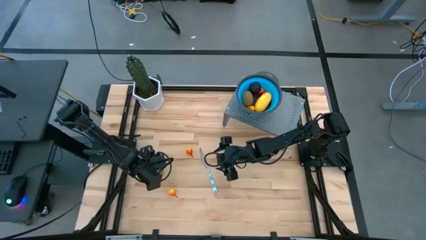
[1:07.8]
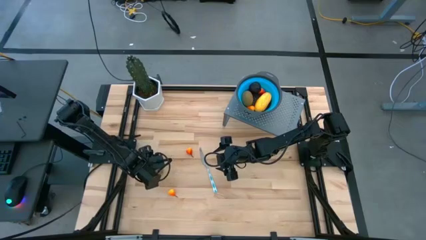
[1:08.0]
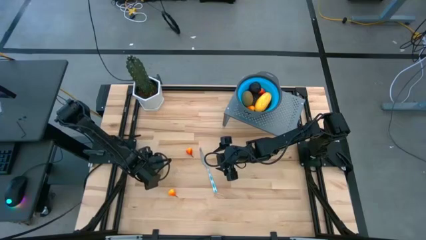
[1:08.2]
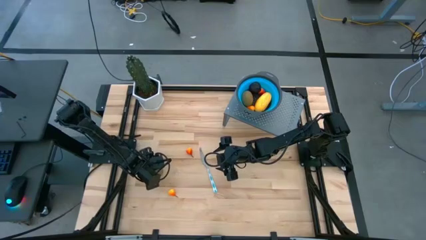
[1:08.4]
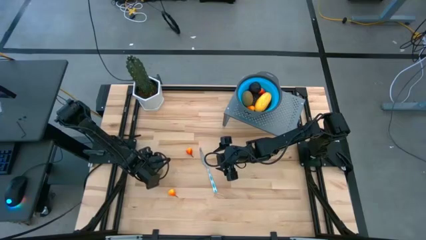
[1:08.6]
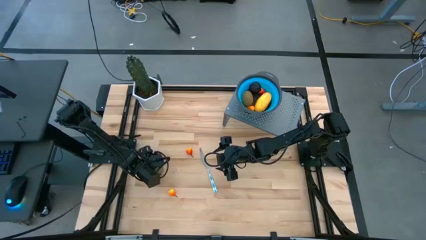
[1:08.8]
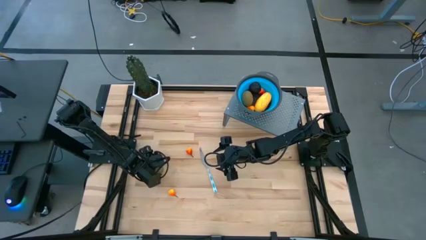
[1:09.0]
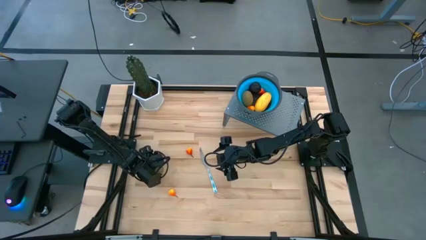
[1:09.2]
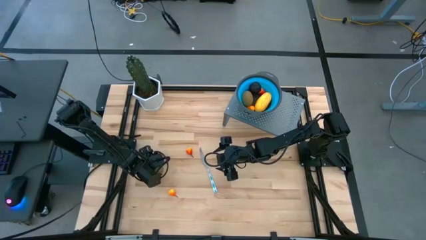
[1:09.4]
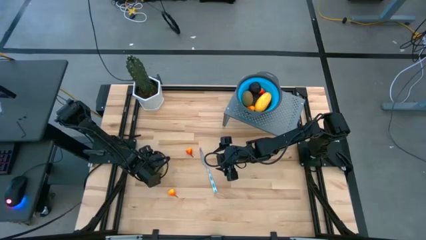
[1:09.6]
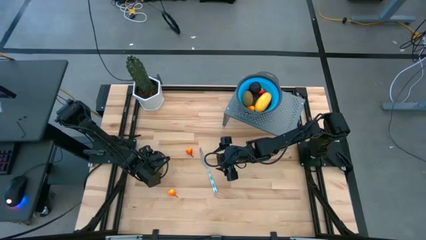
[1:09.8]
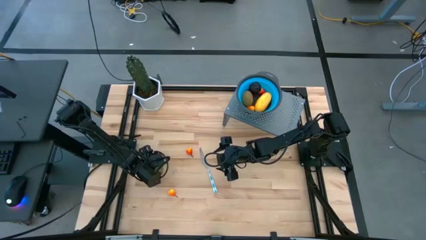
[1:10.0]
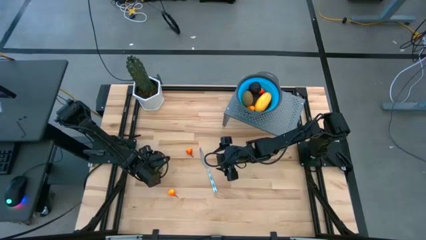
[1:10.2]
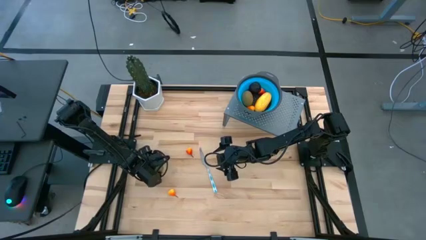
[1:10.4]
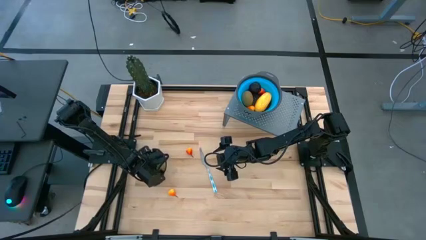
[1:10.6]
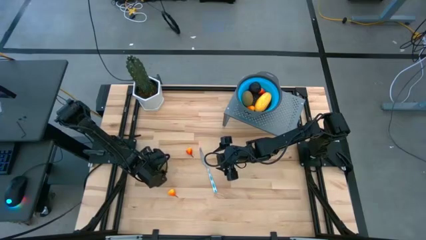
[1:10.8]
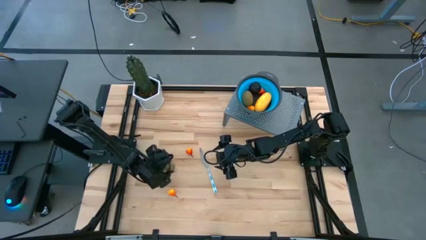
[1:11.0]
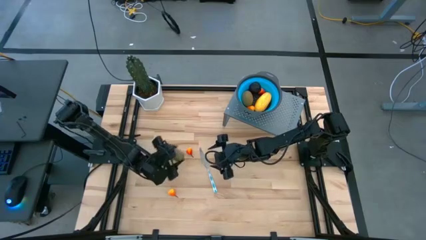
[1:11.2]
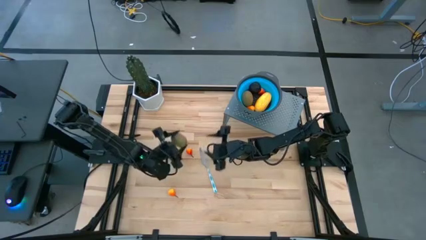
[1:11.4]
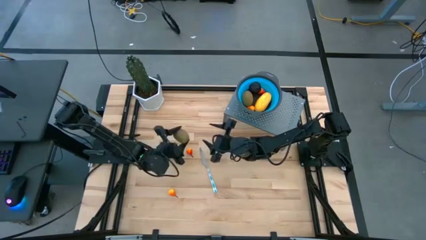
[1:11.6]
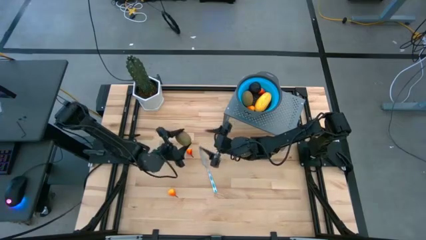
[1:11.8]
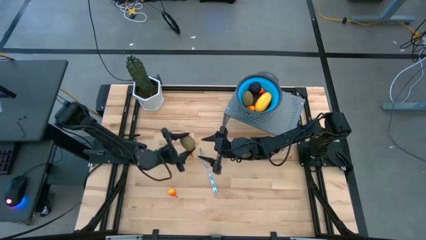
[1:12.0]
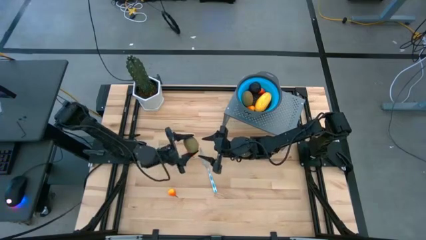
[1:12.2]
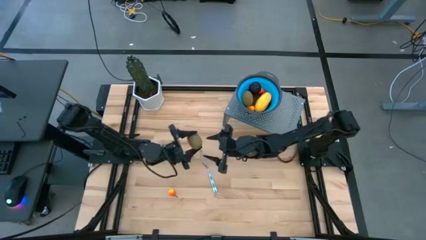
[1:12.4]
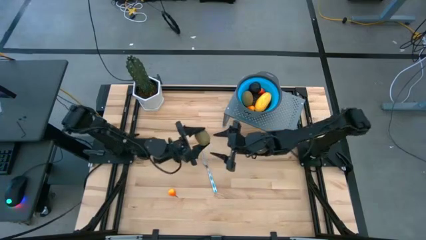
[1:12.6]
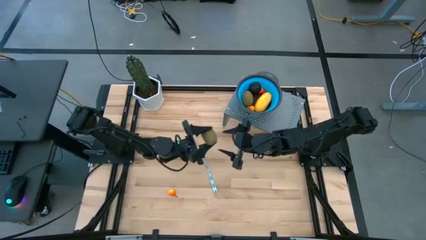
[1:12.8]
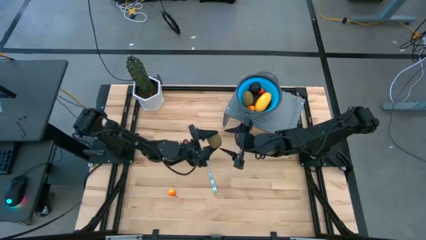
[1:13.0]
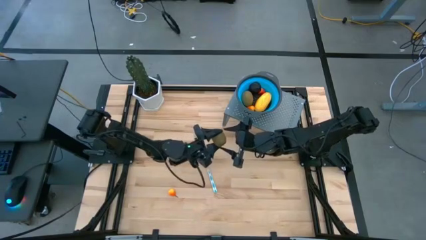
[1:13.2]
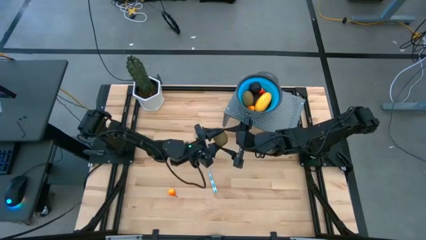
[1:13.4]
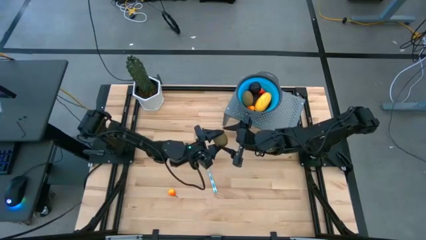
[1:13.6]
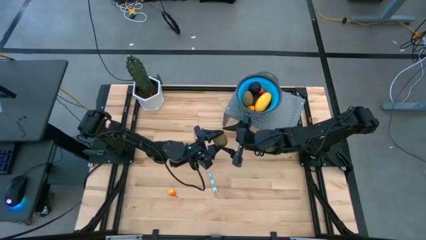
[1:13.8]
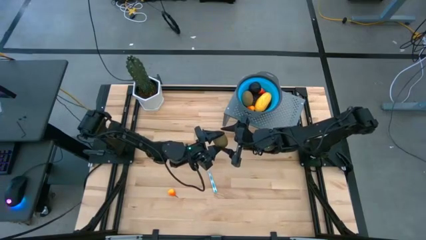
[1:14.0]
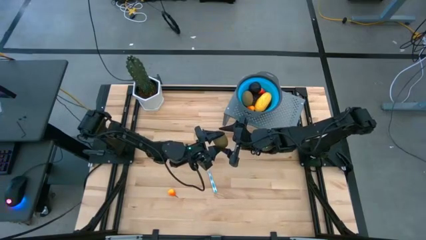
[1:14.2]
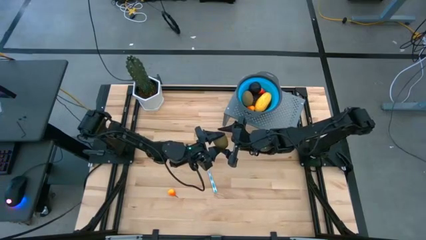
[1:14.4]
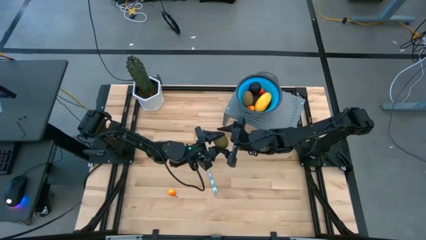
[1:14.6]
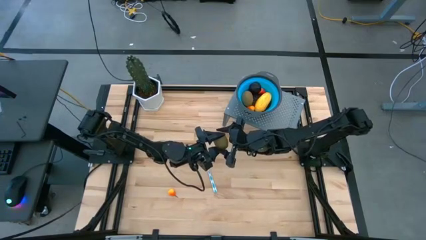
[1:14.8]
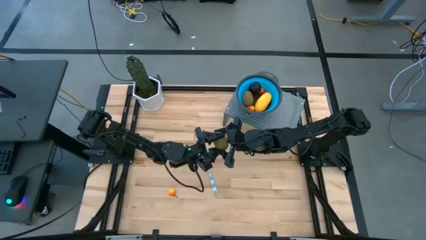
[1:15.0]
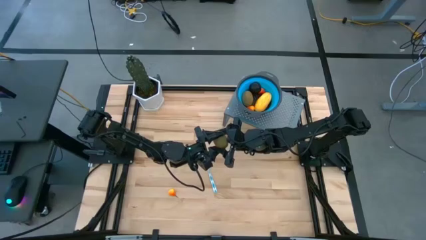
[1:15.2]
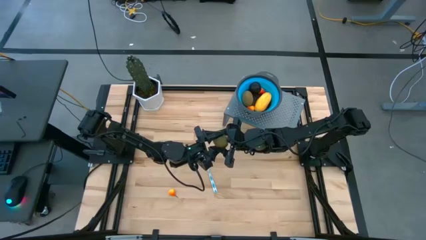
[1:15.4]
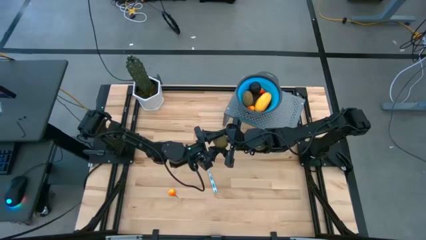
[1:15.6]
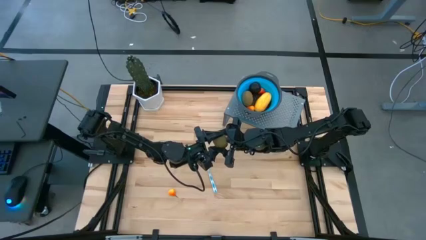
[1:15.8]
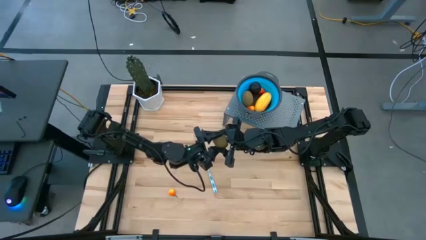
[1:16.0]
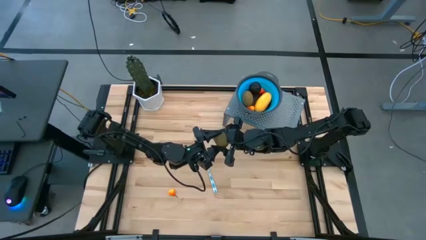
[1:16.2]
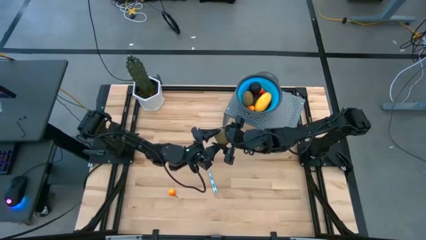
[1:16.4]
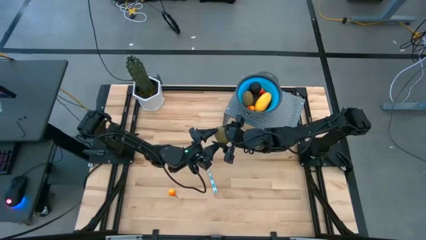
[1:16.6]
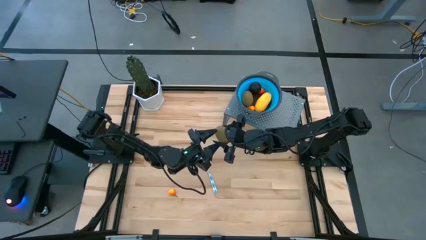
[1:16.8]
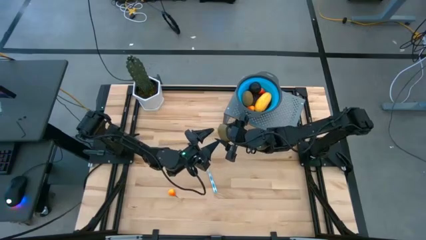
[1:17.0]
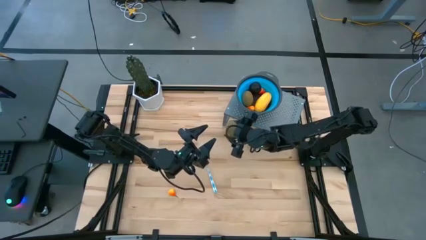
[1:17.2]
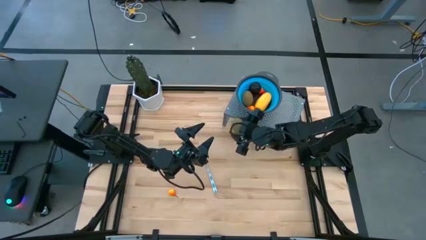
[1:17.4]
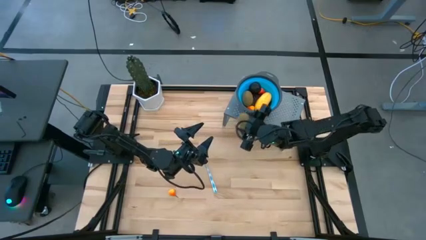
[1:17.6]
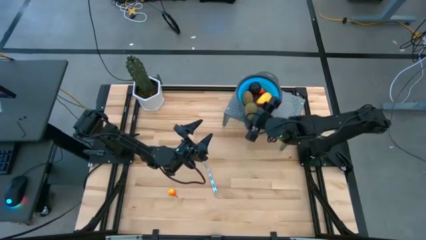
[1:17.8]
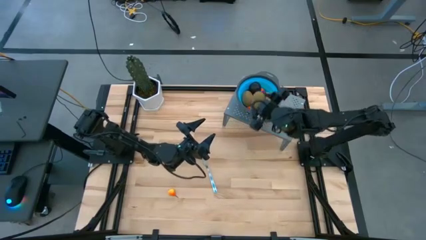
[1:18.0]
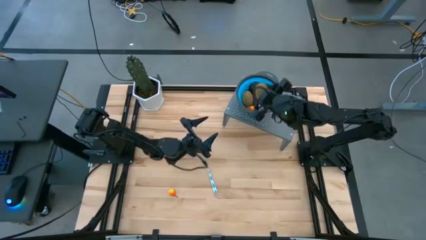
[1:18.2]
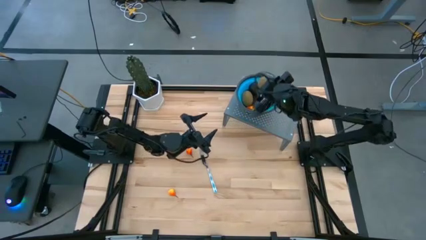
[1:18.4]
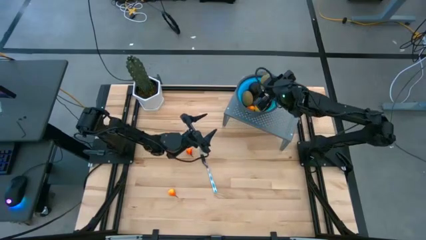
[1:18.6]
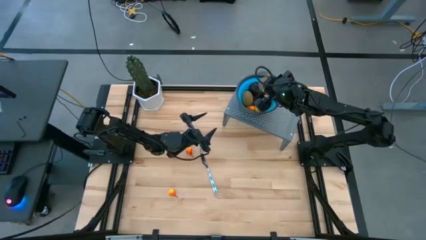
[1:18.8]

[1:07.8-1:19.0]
Task: Pick & Place Fruit
Put the brown kiwi in the blue strainer bowl on the shelf

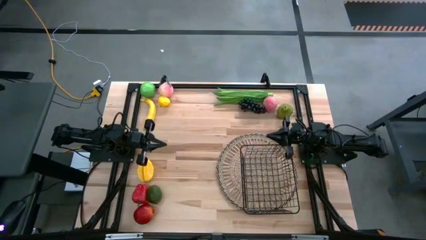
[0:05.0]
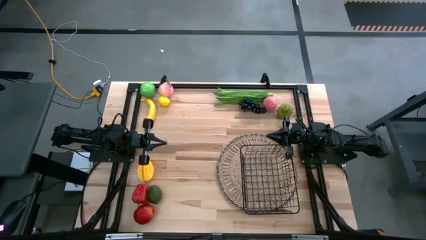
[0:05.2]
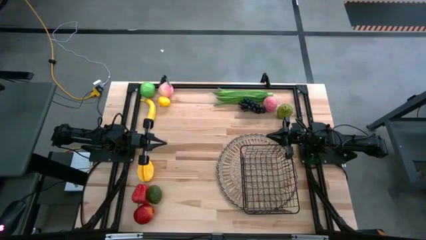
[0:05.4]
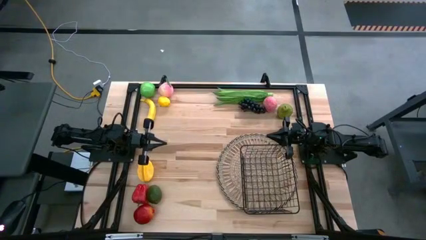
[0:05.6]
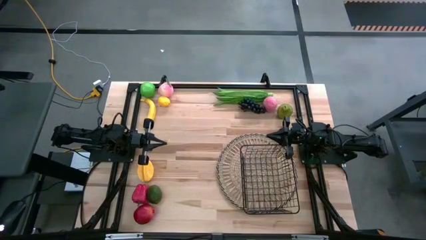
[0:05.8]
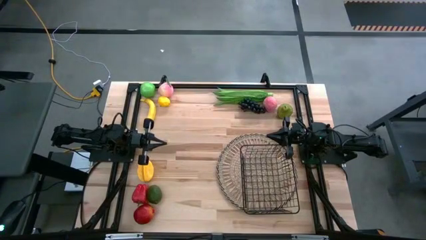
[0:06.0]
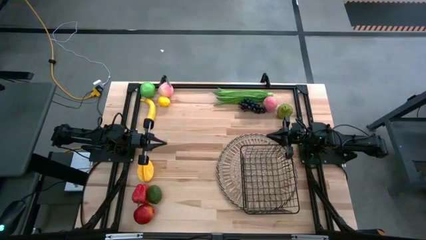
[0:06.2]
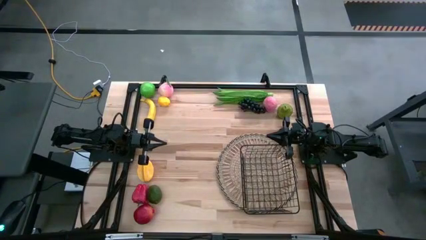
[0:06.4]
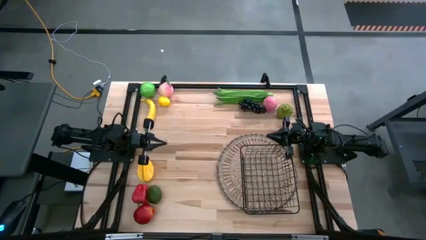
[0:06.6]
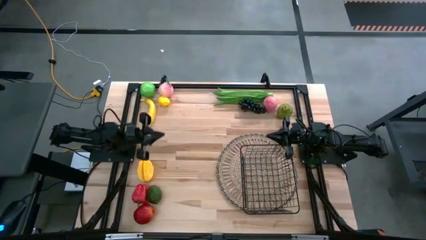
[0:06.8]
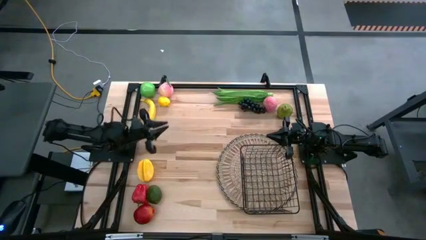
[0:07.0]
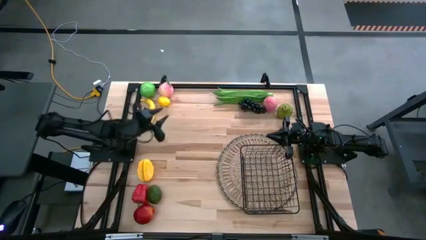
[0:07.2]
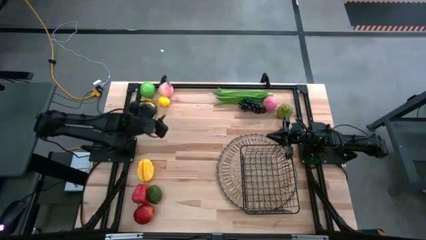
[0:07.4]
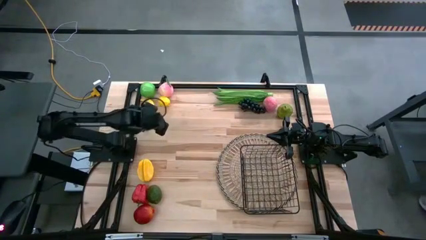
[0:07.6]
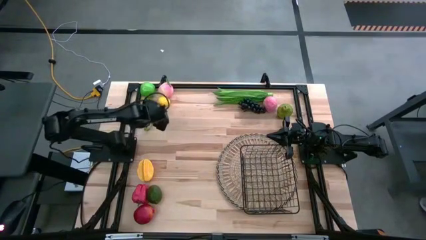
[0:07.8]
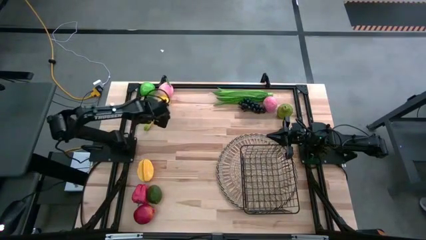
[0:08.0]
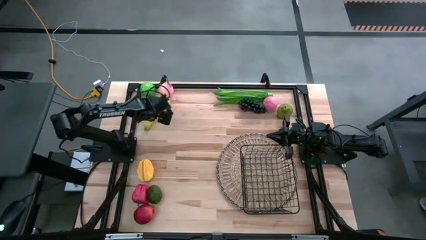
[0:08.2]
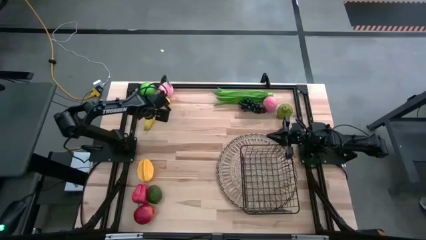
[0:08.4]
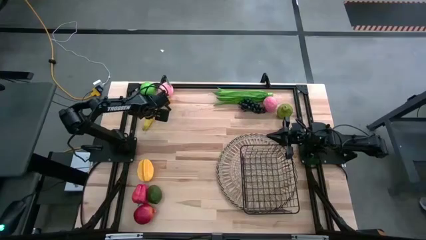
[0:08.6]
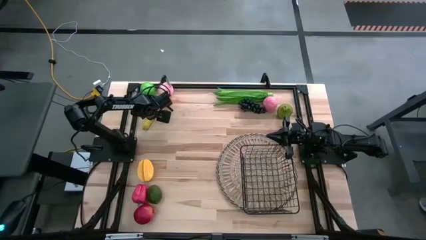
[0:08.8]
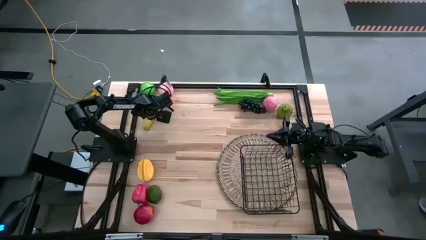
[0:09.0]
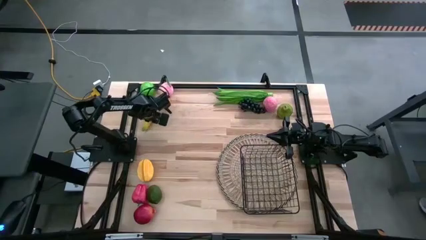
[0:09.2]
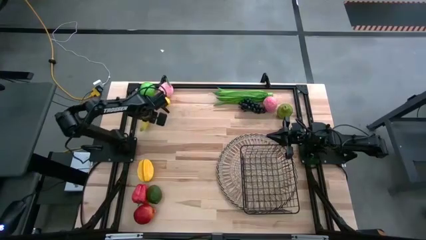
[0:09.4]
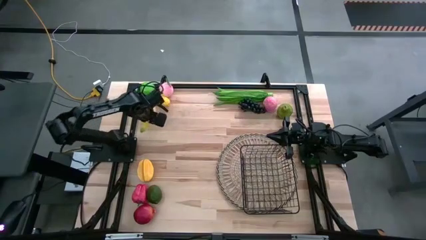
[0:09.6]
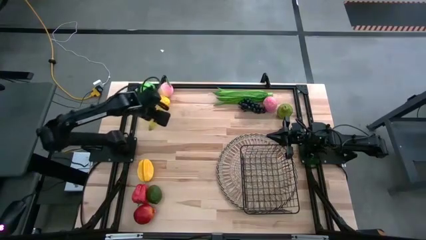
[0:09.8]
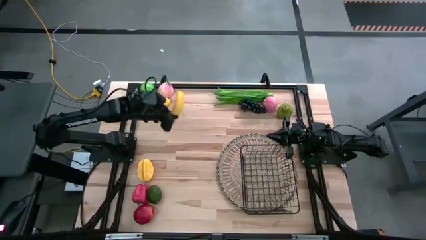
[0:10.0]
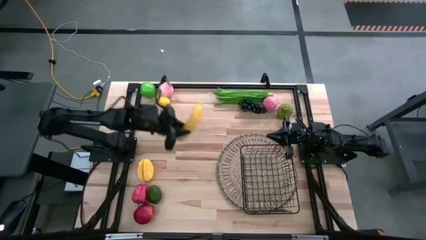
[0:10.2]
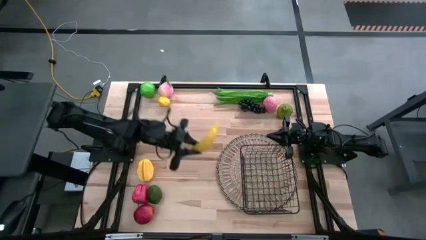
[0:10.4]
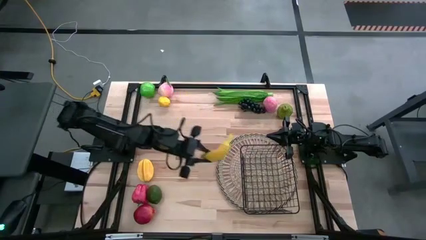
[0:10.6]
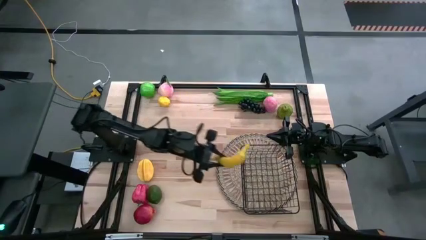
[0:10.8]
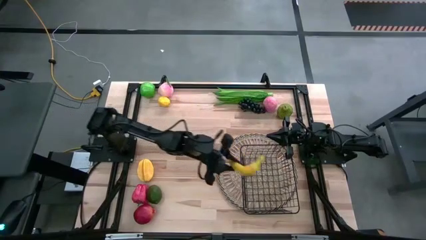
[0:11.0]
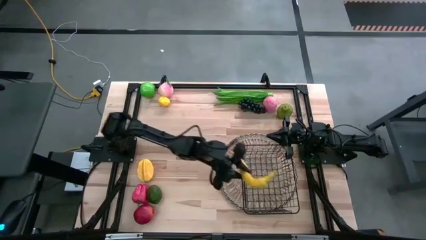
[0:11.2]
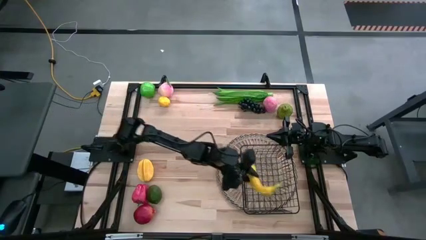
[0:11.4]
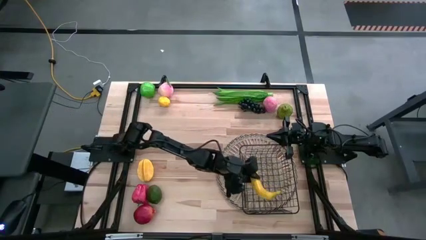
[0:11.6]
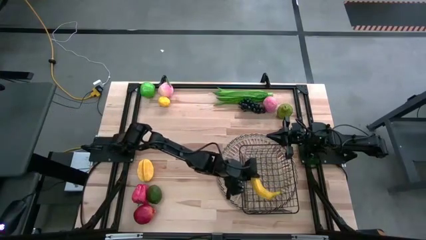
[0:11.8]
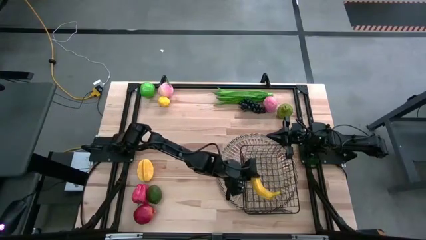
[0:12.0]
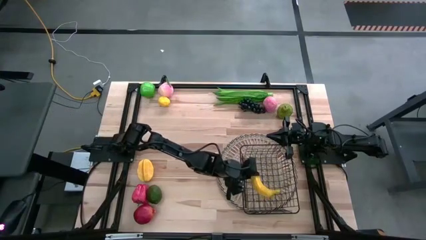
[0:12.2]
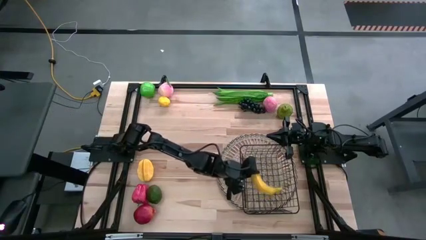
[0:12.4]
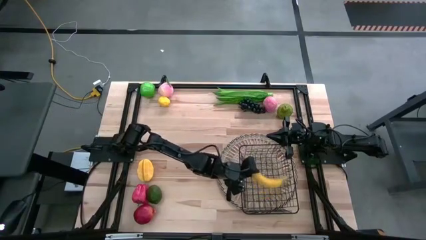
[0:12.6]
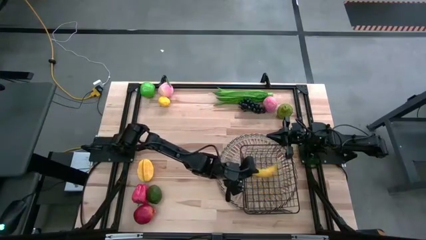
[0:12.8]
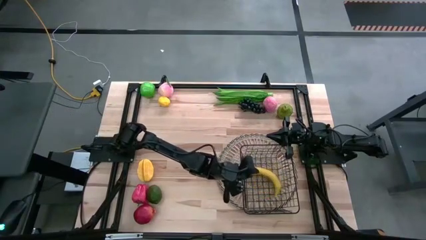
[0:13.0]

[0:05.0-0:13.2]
Task: Build produce basket
Put the banana into the wire basket
